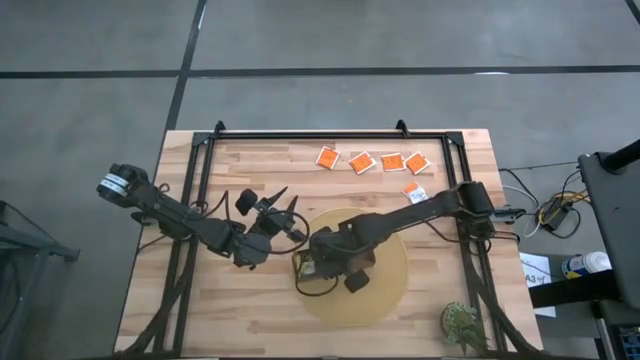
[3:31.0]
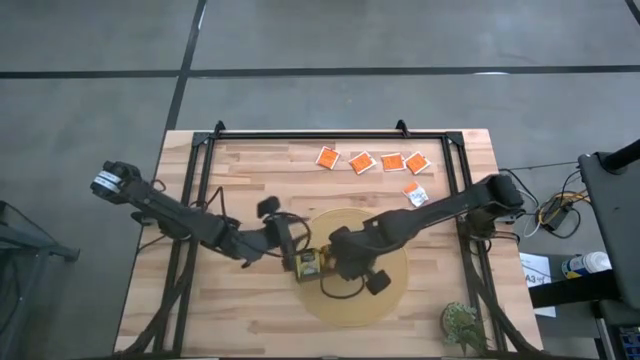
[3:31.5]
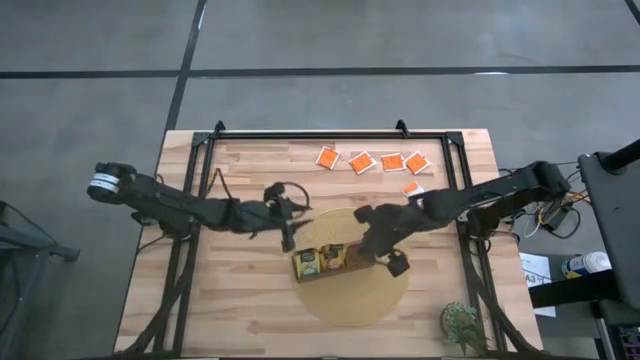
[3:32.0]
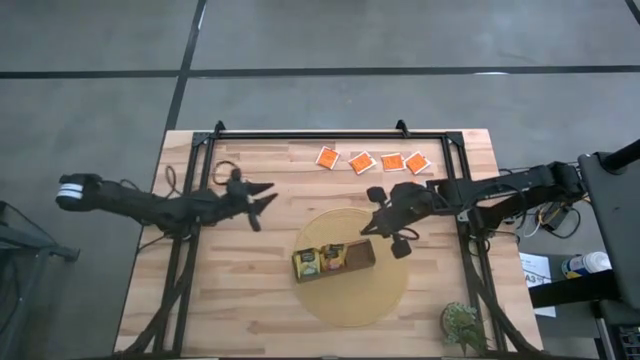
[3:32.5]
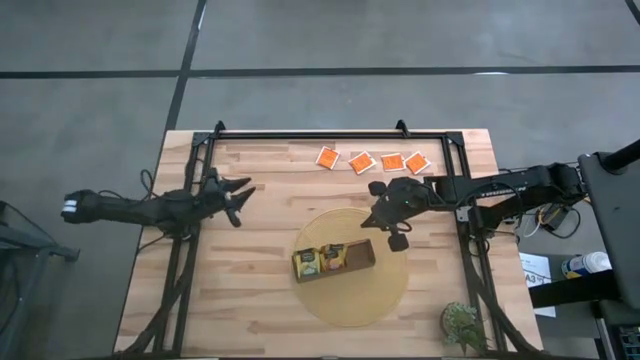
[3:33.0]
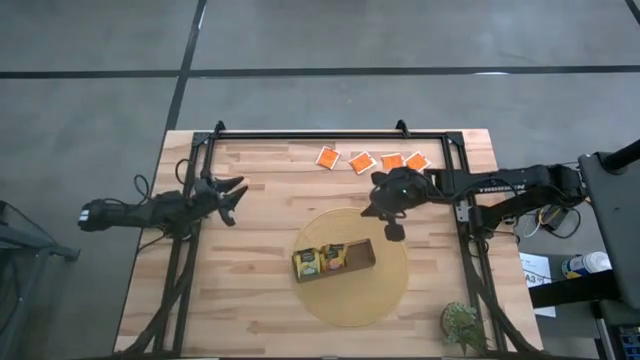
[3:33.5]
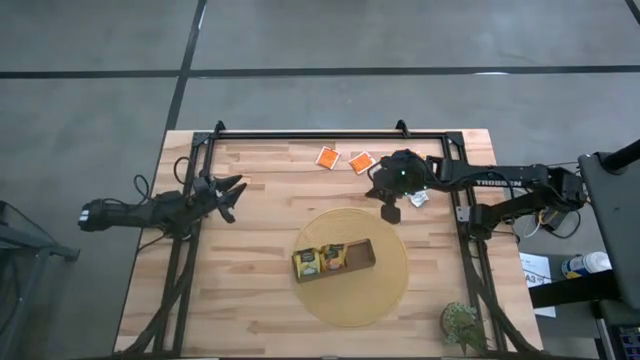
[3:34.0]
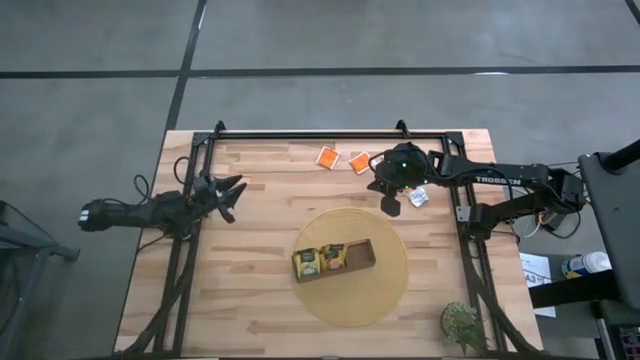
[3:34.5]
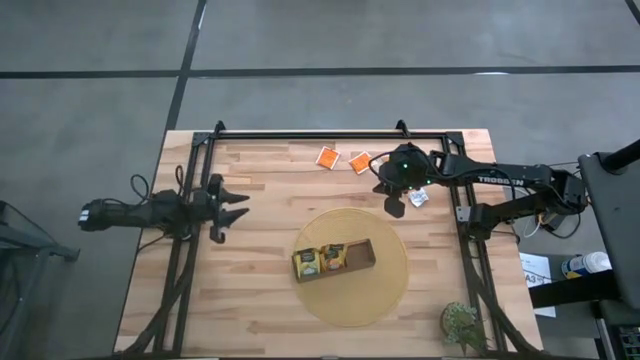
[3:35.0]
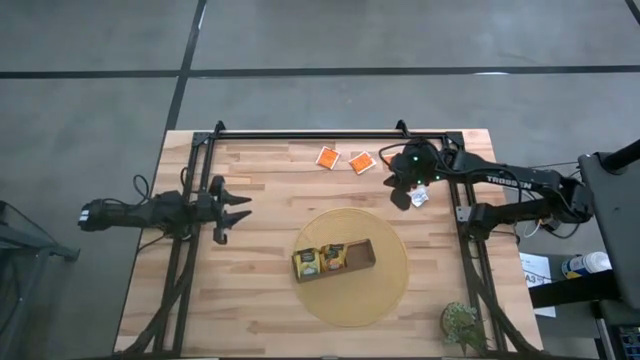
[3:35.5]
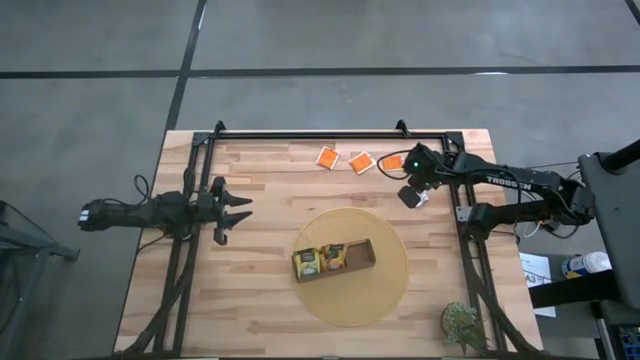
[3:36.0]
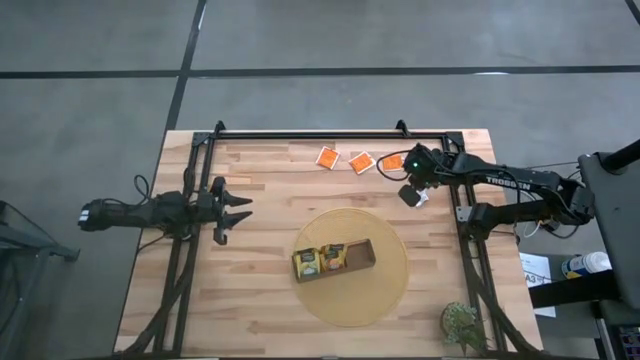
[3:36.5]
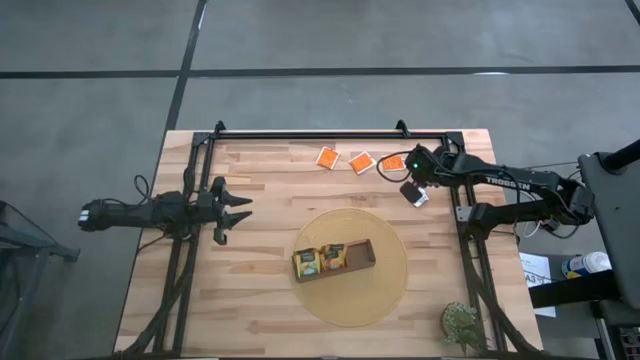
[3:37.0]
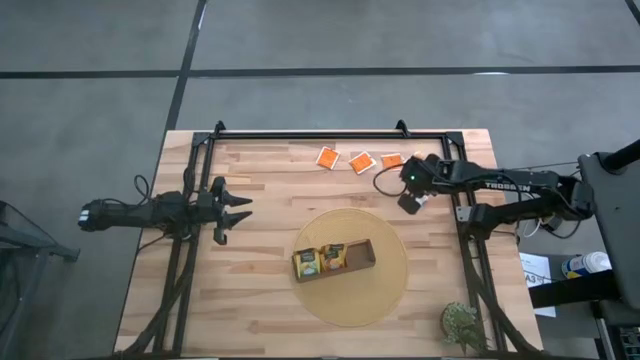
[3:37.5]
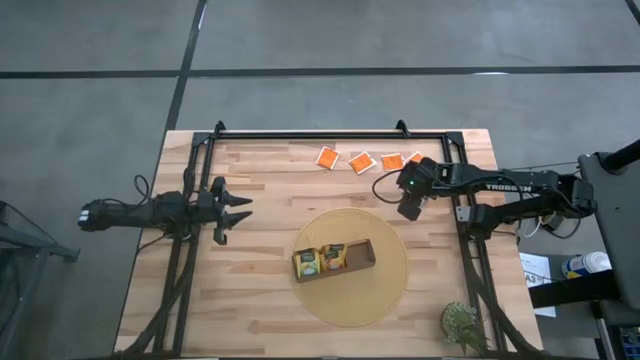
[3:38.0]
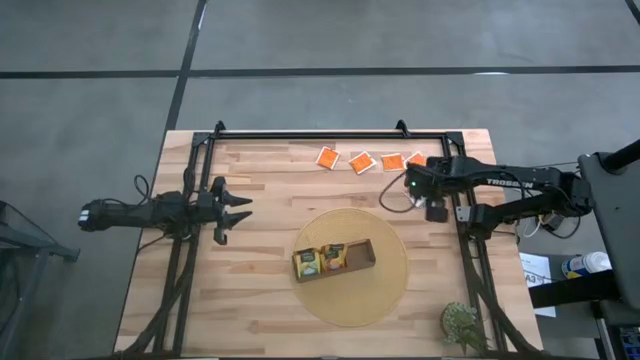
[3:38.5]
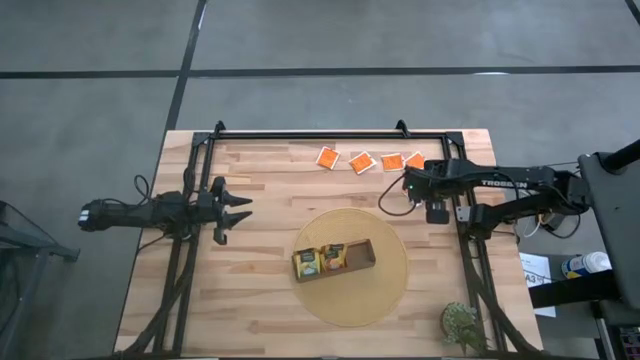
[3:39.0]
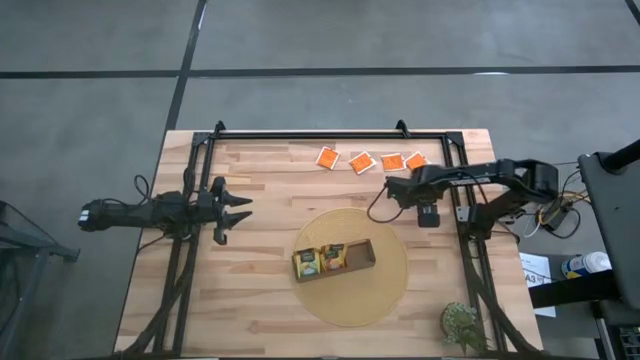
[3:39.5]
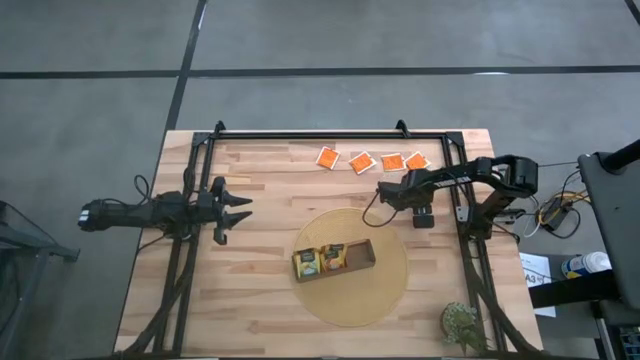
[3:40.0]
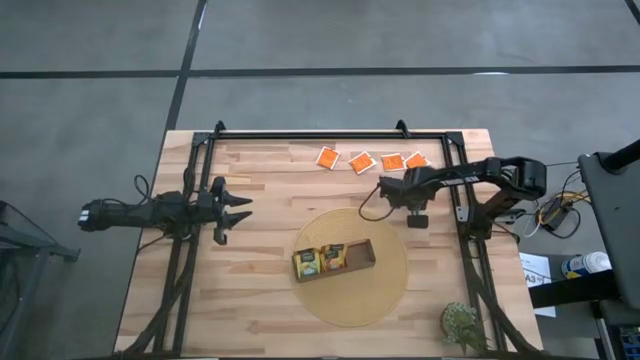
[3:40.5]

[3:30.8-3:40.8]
Task: Pick & Place Tea
Put the orange tea bag into the right section of the wooden organizer

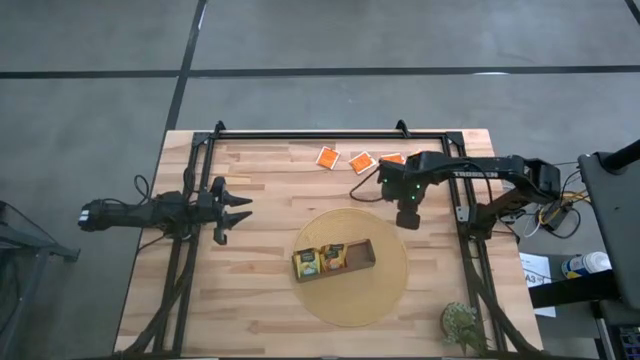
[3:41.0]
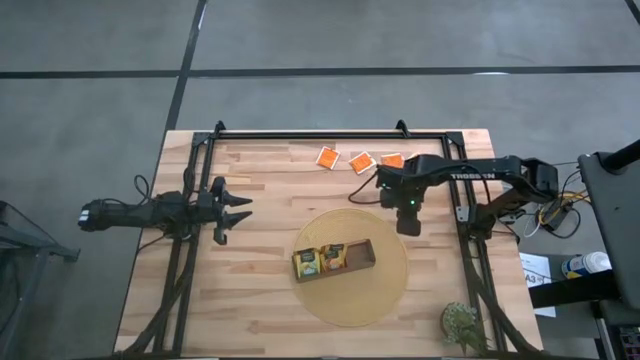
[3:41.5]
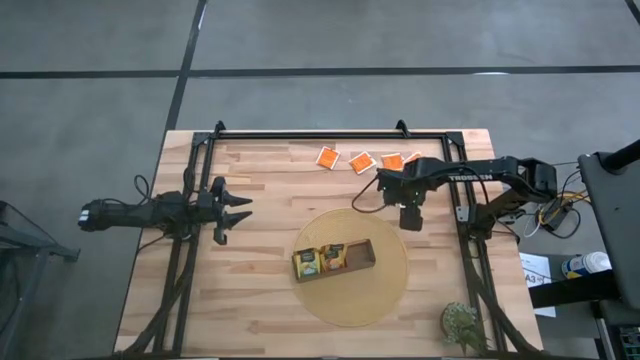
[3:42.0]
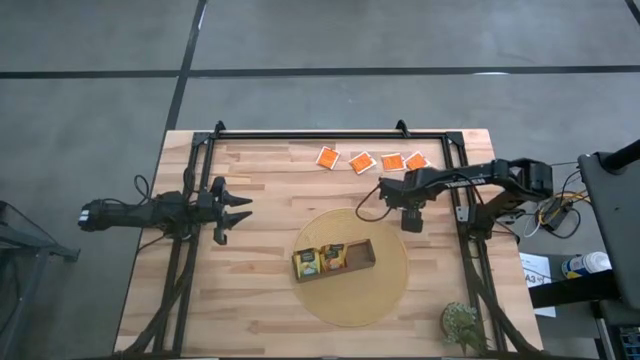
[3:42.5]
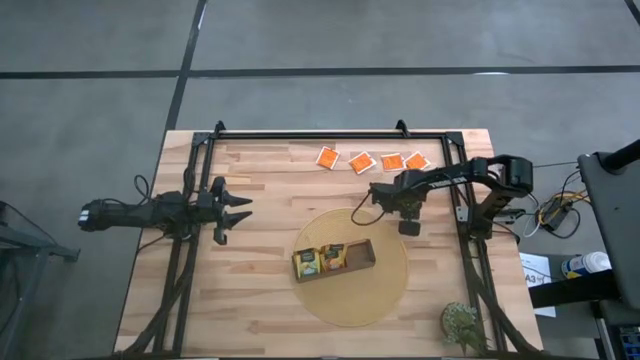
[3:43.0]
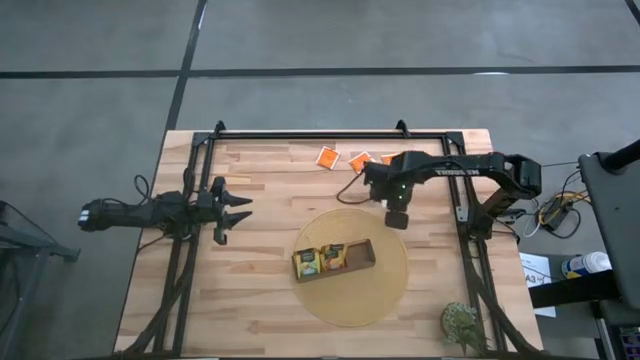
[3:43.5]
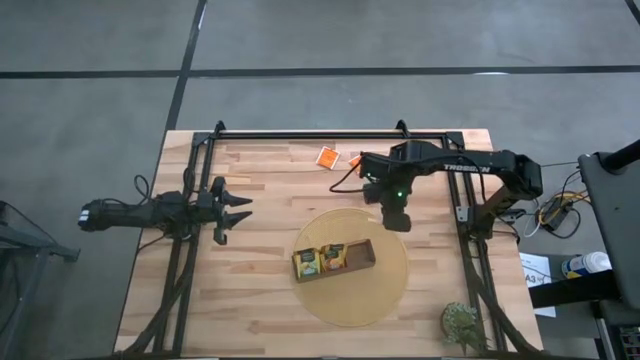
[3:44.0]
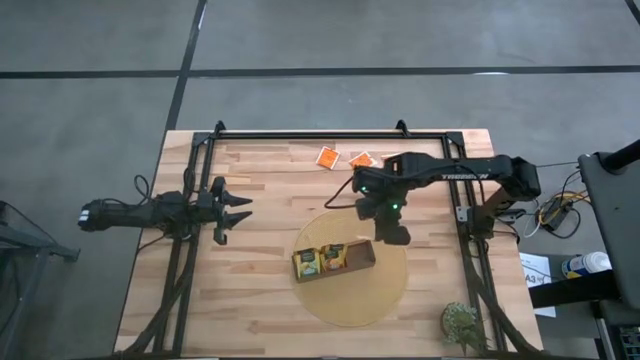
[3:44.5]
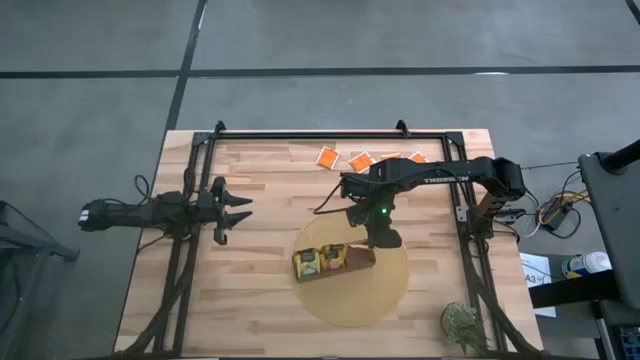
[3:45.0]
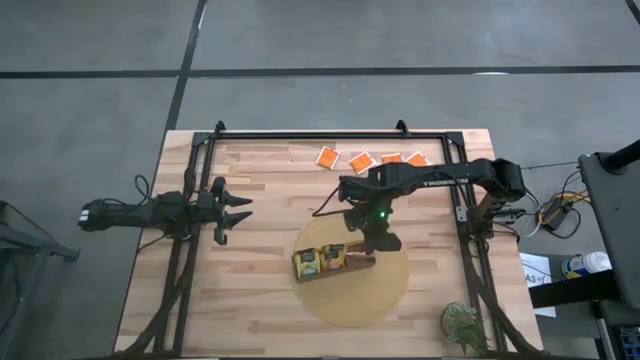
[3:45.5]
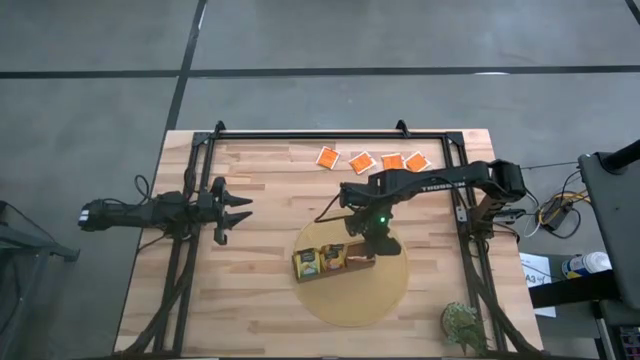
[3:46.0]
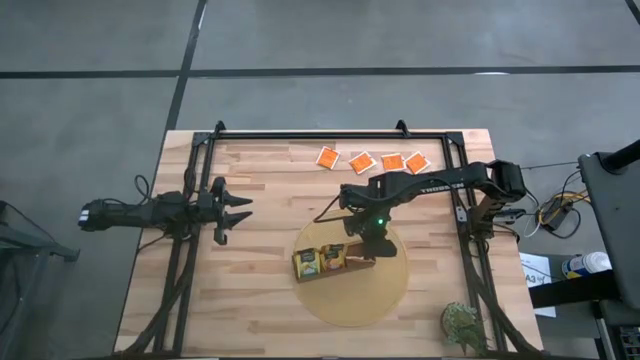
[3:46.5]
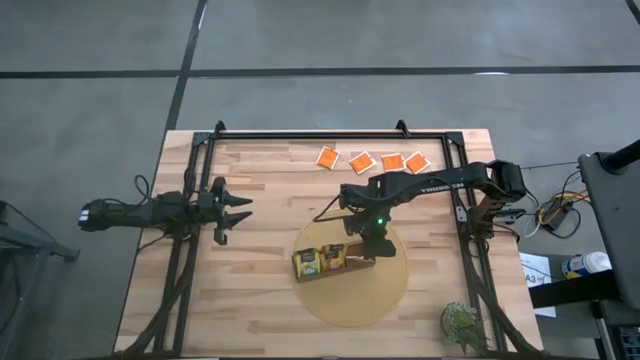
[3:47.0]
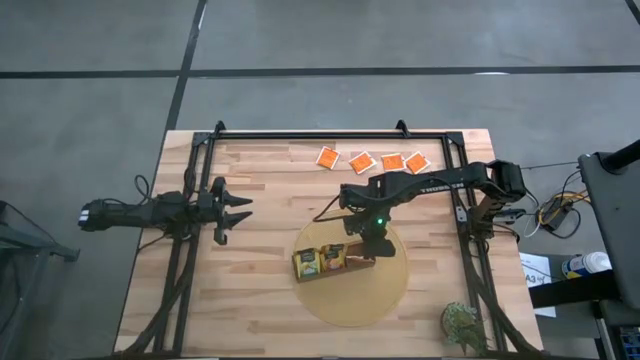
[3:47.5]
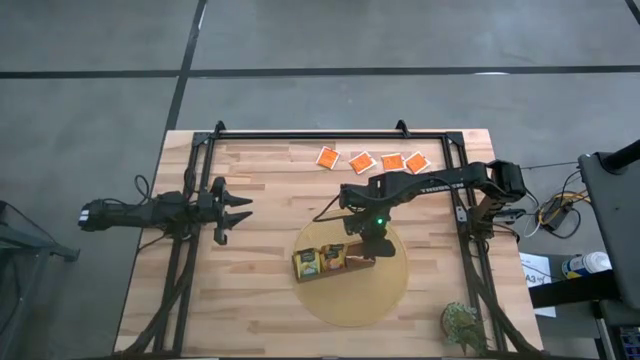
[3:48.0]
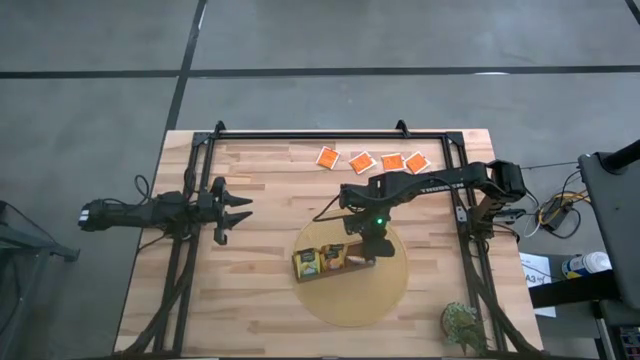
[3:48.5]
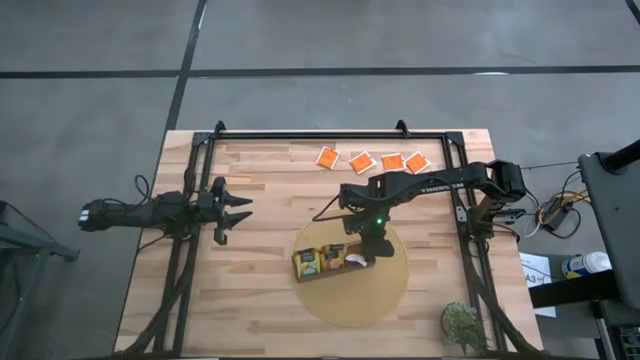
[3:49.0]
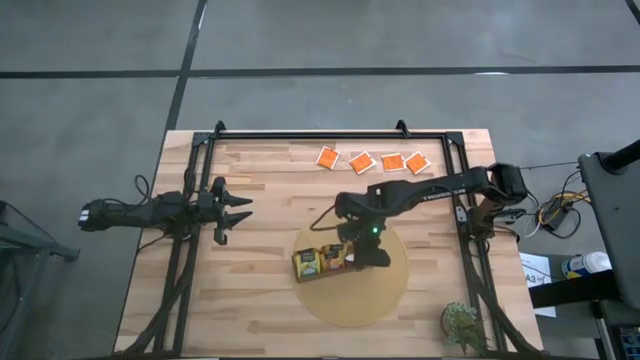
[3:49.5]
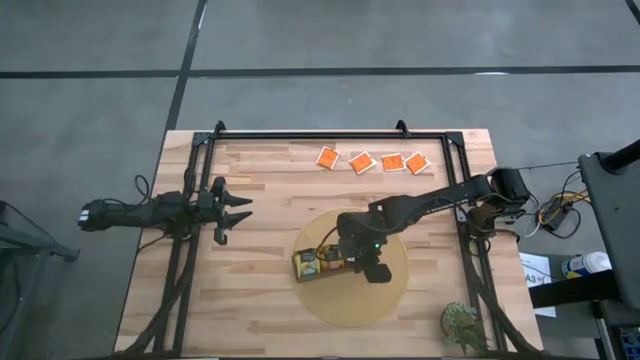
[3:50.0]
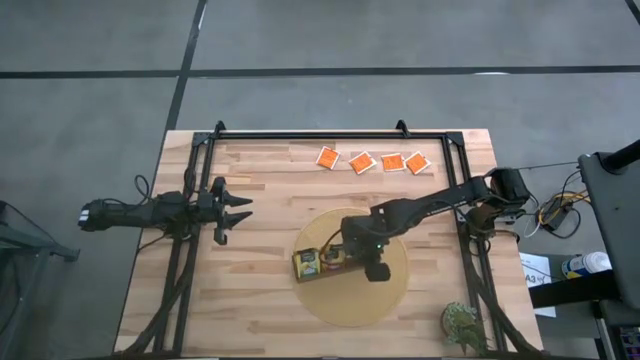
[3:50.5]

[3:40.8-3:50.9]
Put the orange tea bag into the right section of the wooden organizer

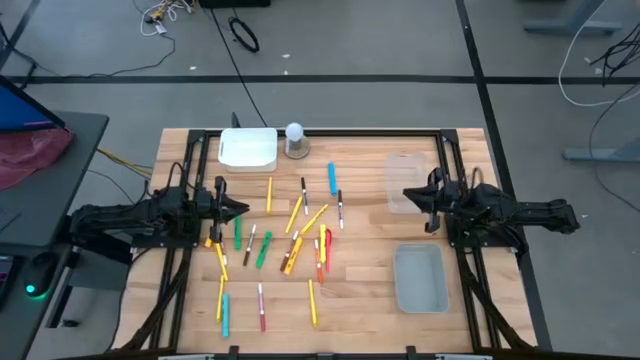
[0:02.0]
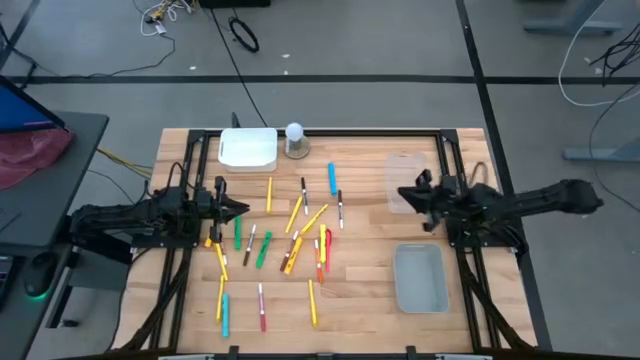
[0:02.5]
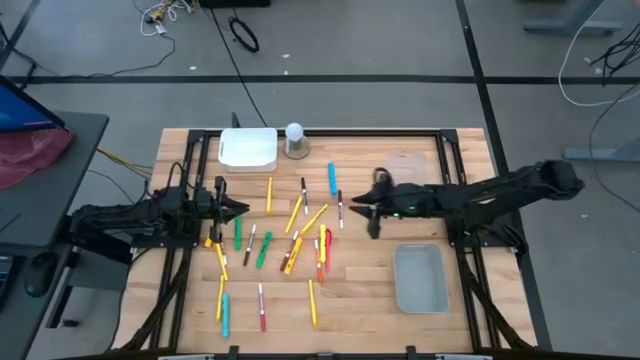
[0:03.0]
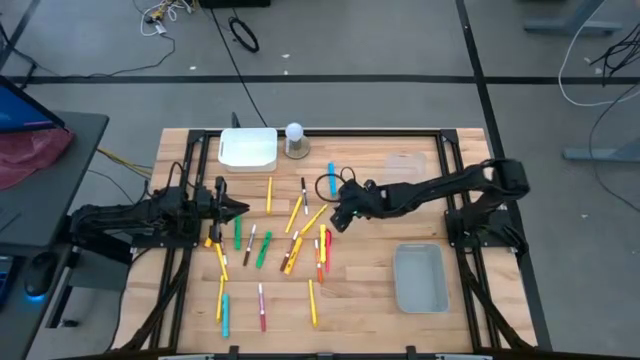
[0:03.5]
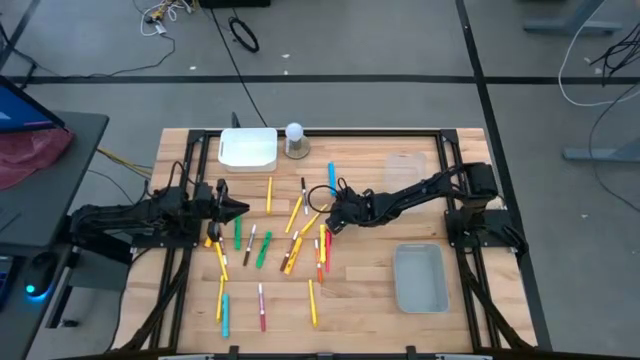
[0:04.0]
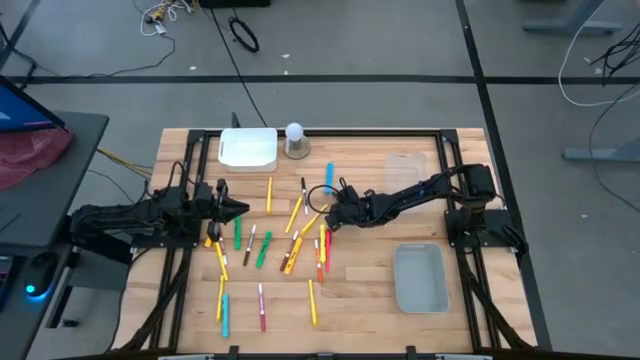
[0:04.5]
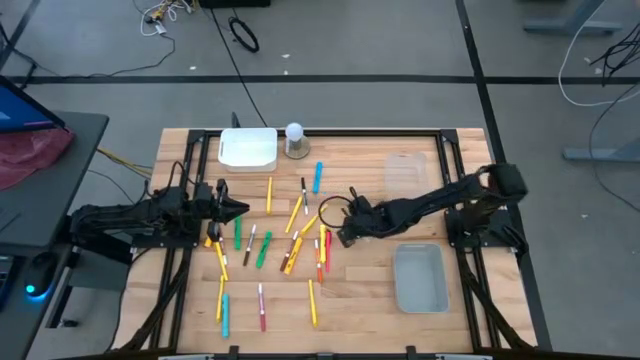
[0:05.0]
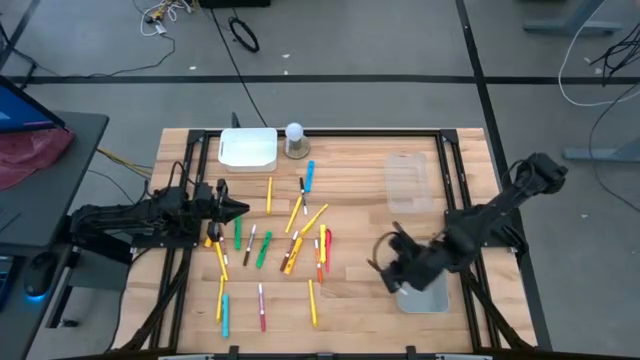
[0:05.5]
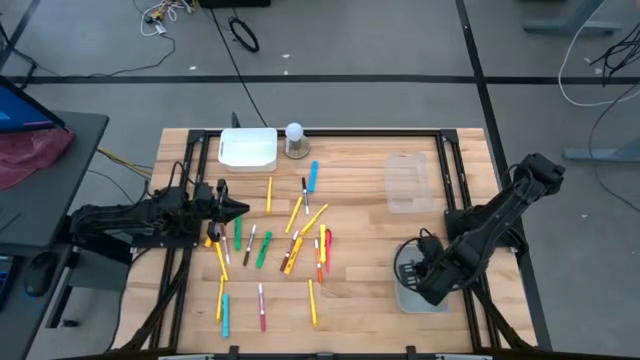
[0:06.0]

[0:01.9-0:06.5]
Task: Pick & Place Markers
Put the brown marker pen into the gray bin
